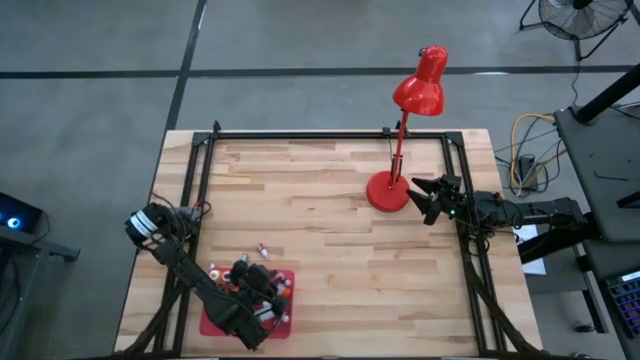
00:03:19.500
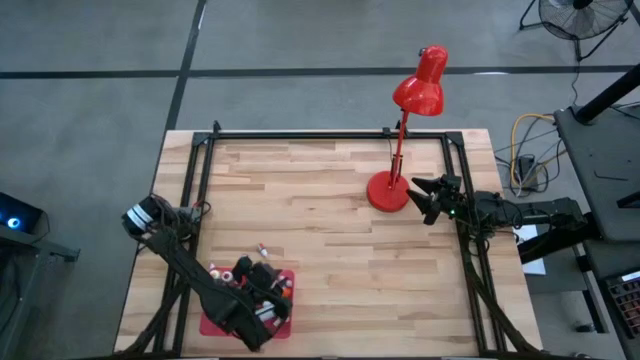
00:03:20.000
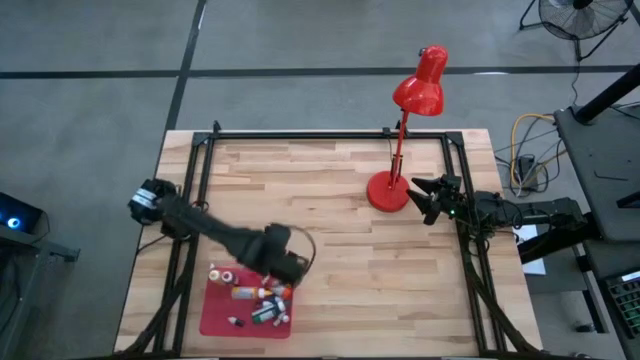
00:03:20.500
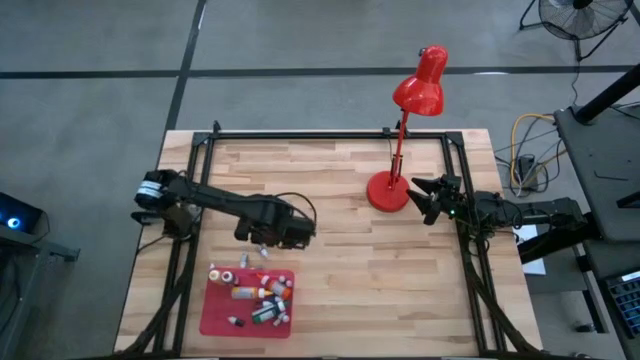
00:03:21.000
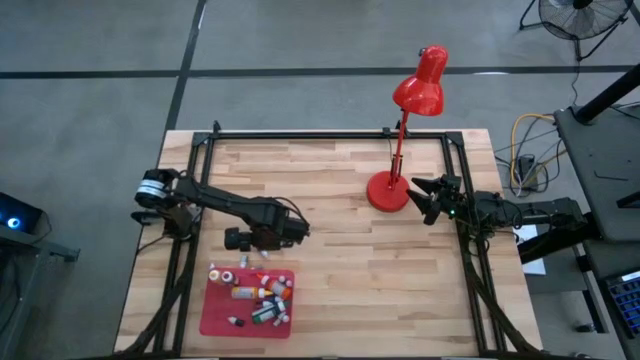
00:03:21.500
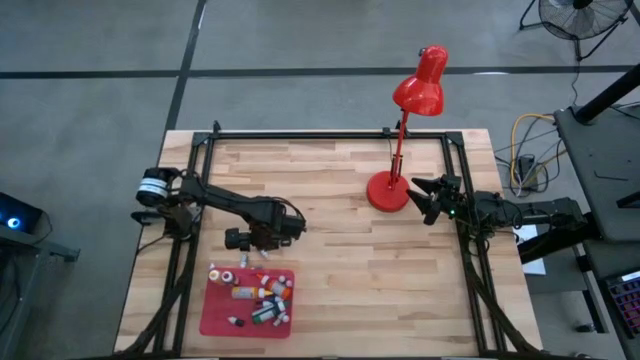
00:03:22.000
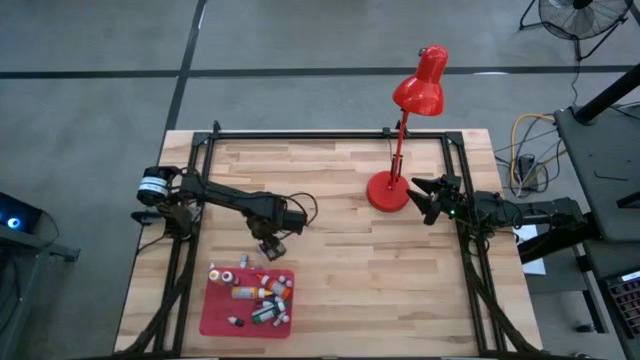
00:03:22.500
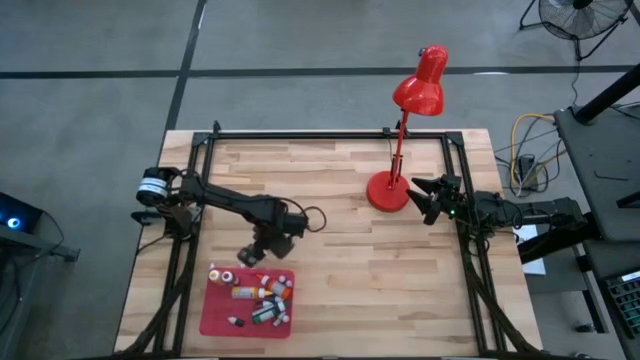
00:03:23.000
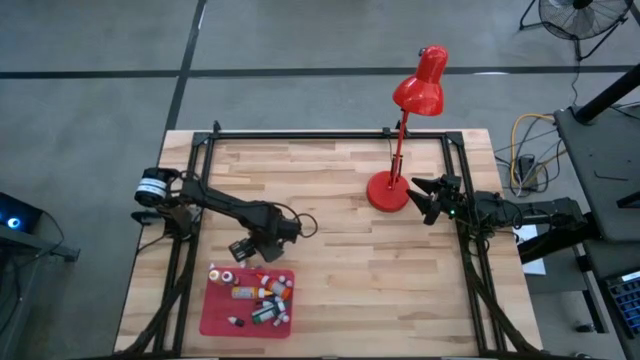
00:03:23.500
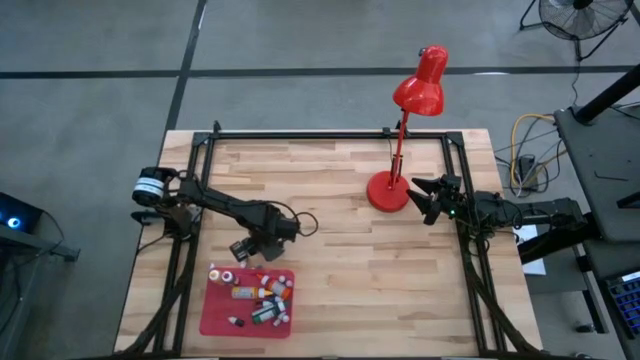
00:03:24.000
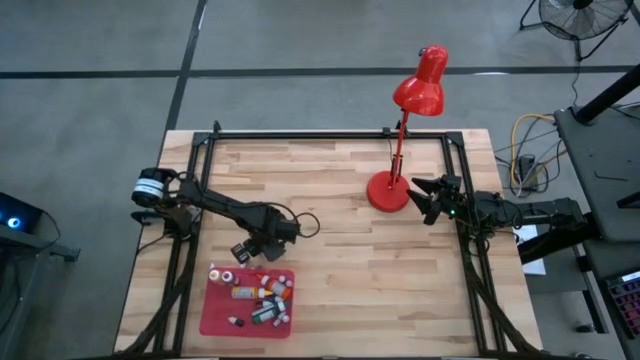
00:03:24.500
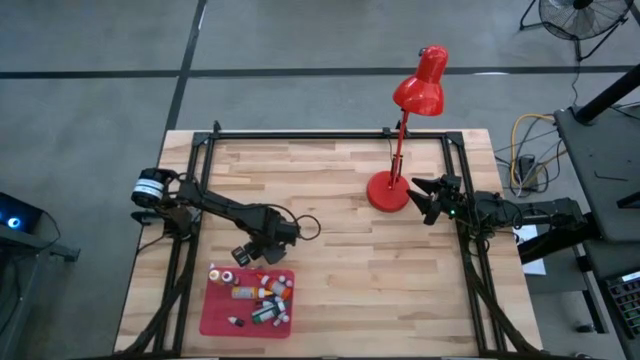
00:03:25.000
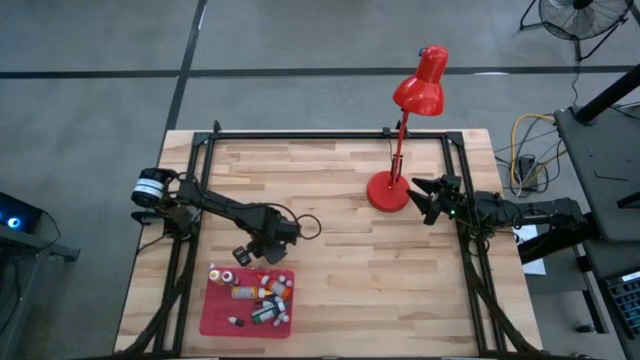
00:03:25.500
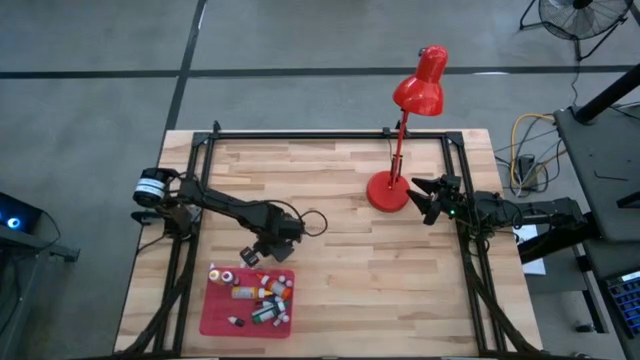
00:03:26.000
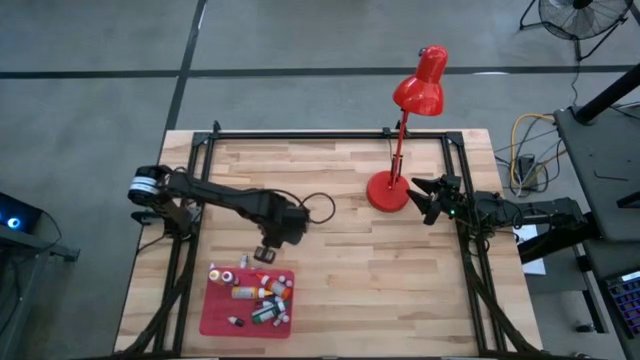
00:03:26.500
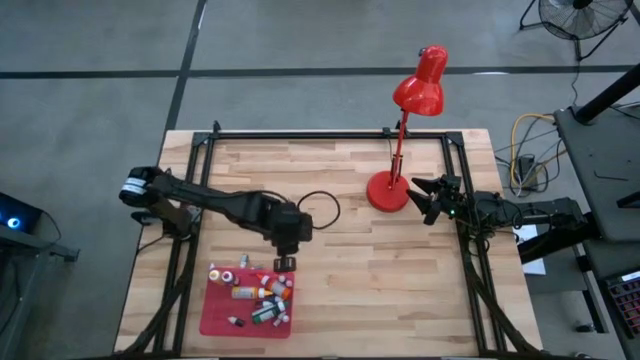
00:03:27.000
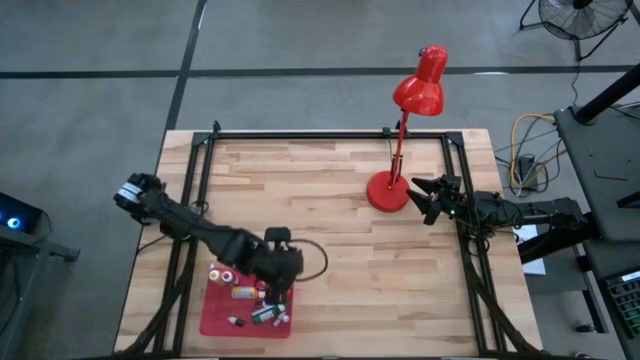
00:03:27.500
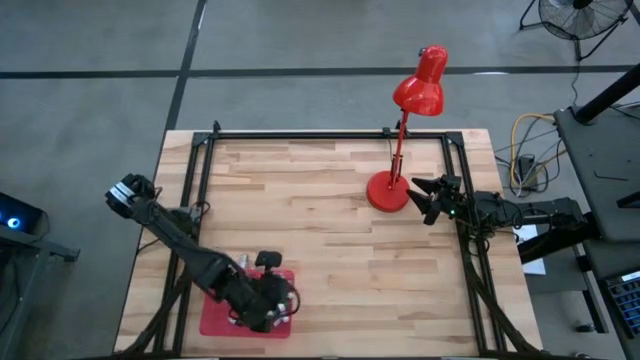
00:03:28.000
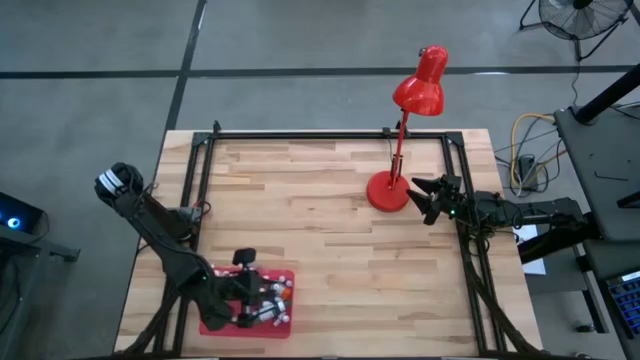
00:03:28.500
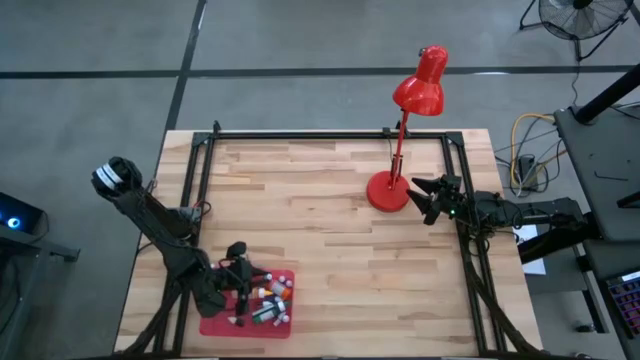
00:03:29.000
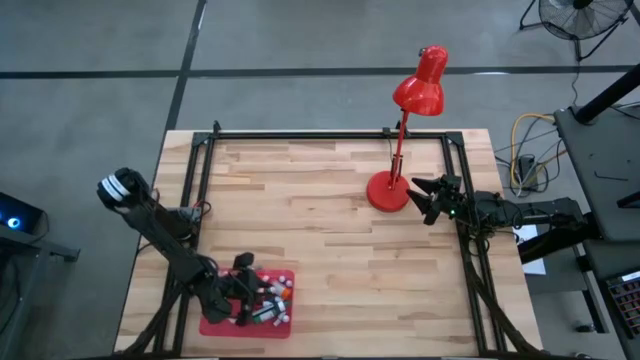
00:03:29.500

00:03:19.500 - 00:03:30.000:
Task: Pick & Place food coloring
Put the small red food coloring bottle into the red bin

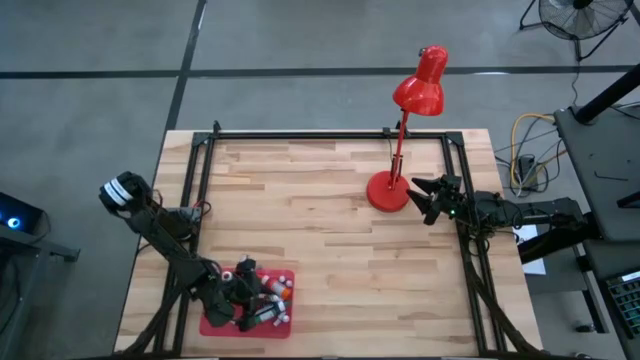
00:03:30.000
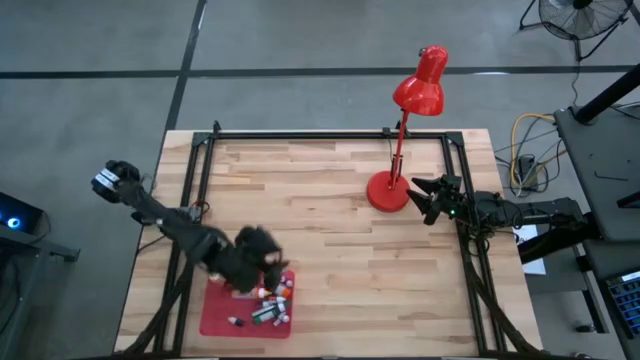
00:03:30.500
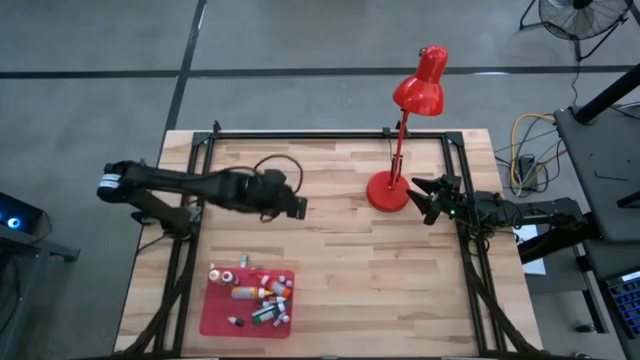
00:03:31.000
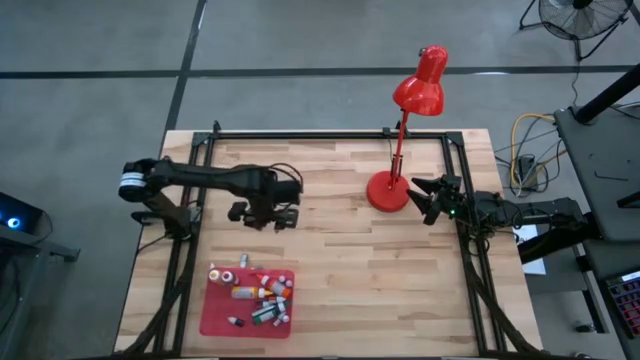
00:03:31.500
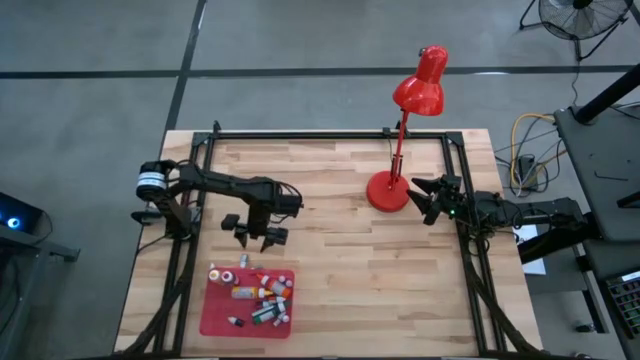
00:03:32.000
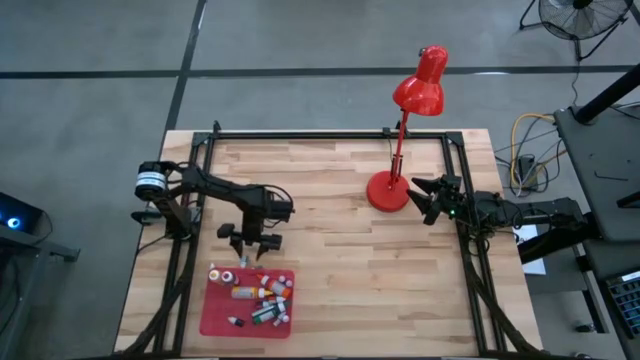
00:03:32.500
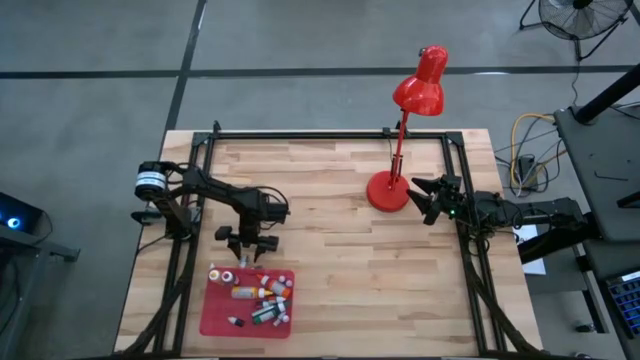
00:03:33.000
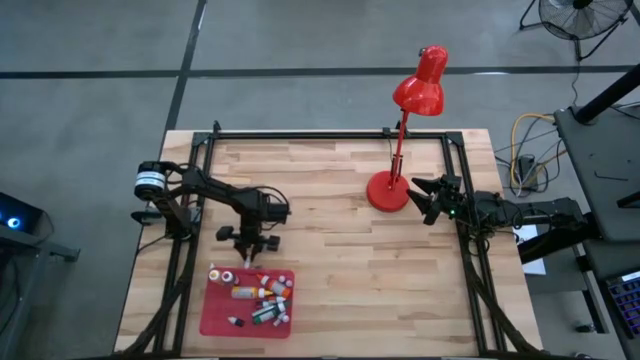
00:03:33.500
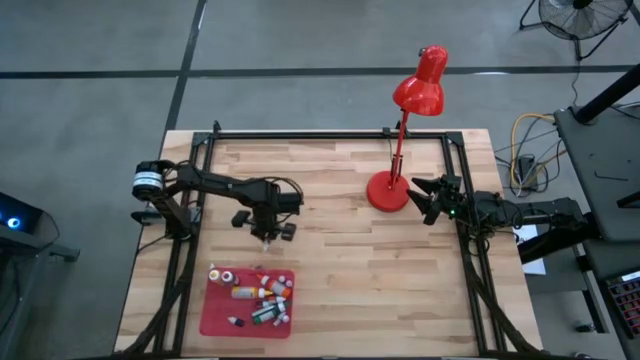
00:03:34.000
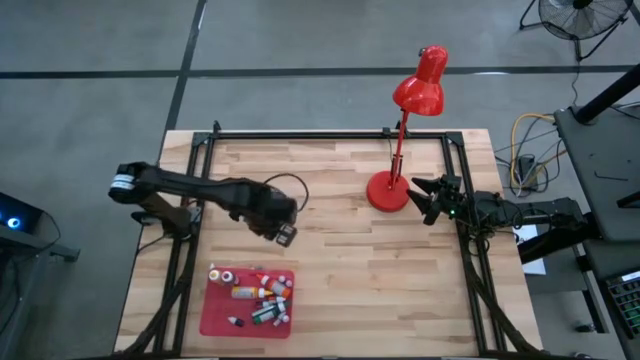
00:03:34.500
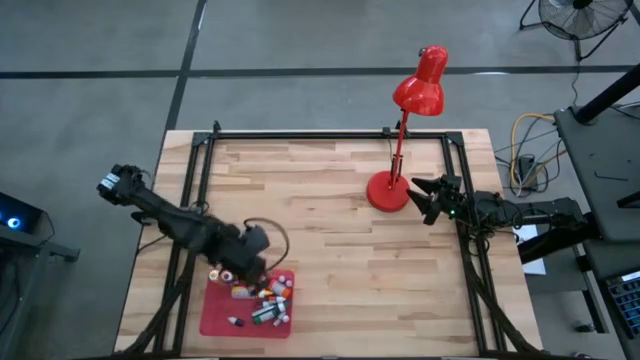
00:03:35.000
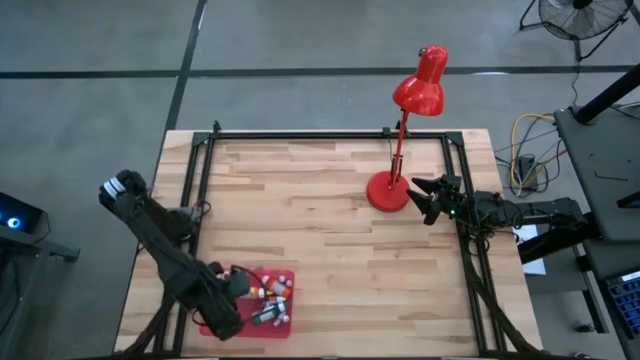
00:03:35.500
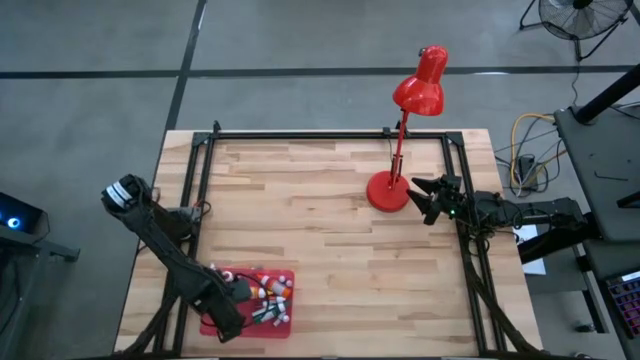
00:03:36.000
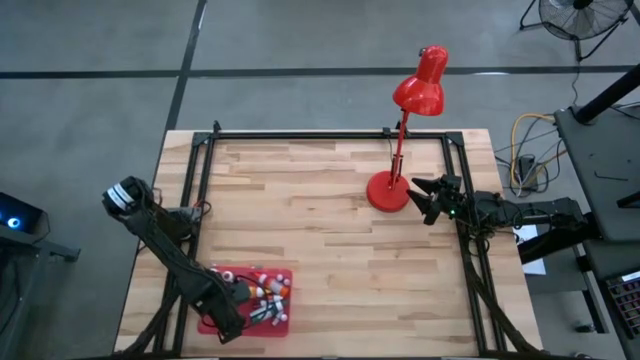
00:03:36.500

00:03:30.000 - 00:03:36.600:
Put the small green food coloring bottle into the red bin

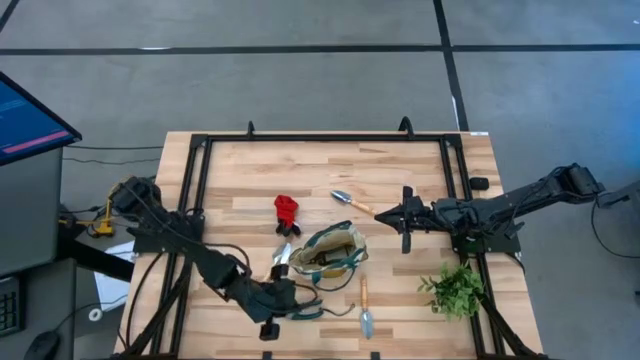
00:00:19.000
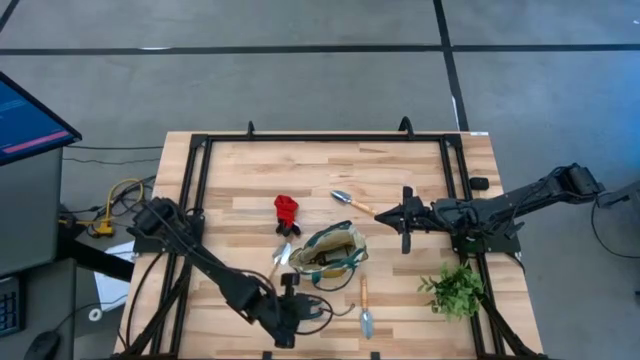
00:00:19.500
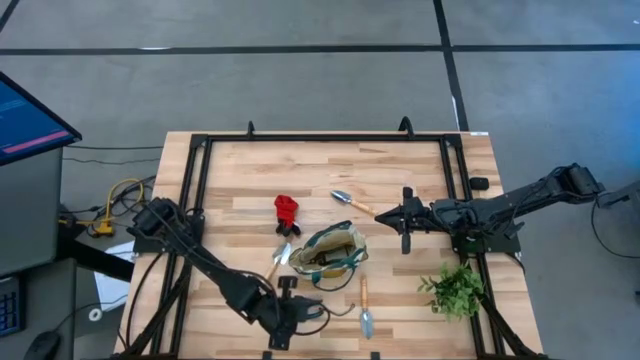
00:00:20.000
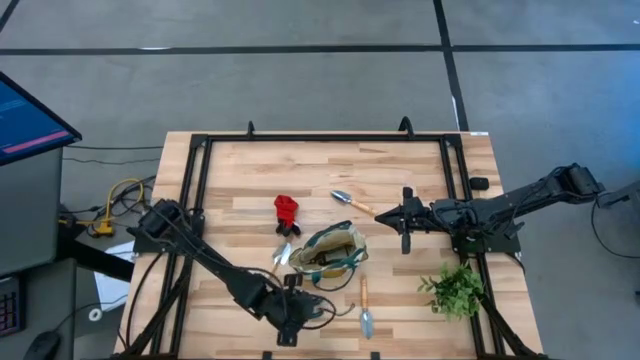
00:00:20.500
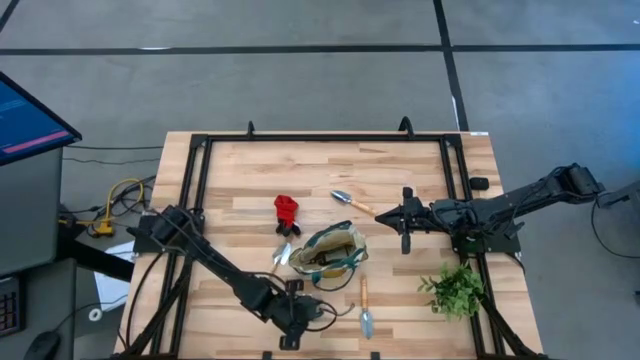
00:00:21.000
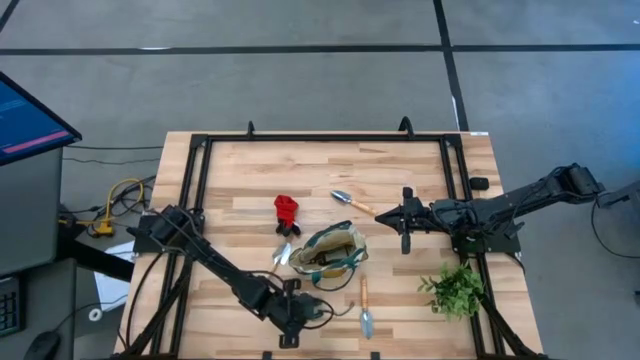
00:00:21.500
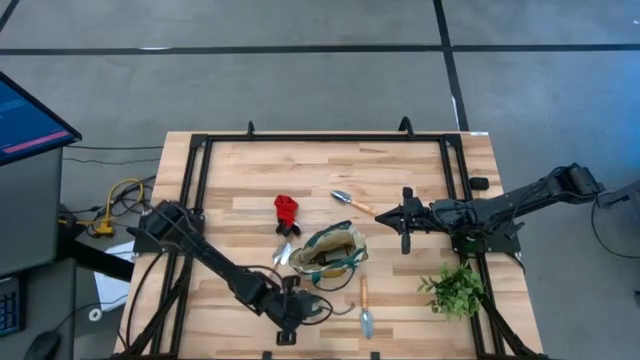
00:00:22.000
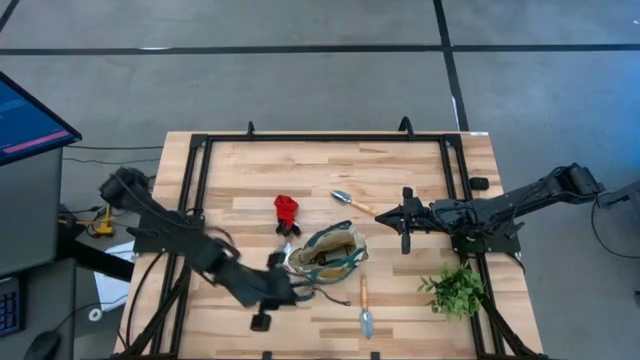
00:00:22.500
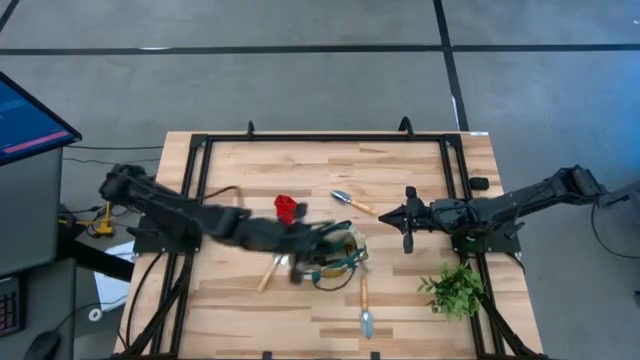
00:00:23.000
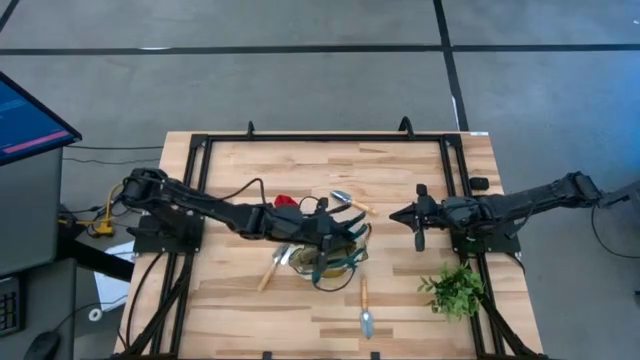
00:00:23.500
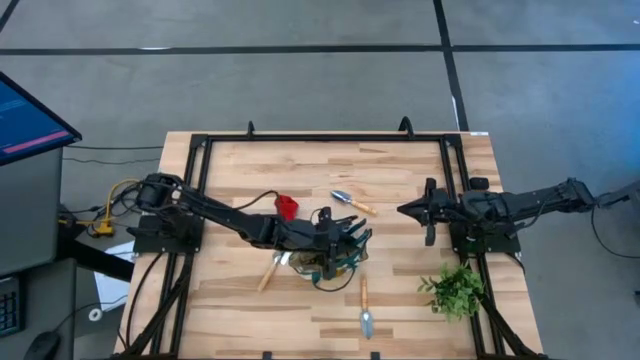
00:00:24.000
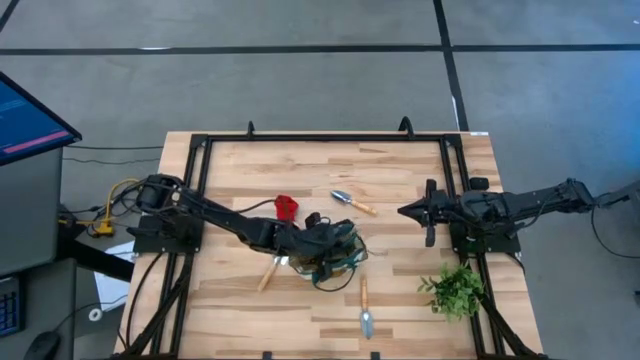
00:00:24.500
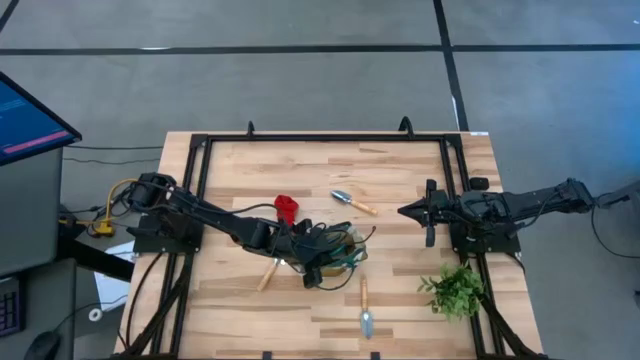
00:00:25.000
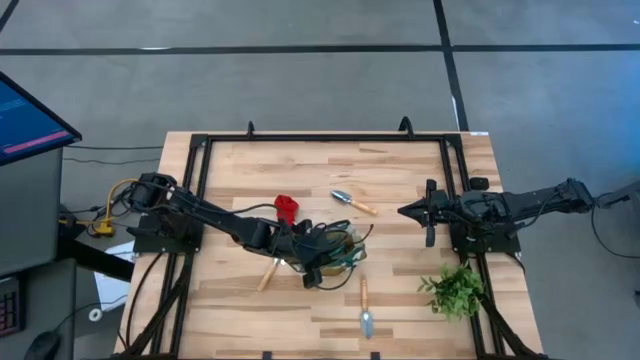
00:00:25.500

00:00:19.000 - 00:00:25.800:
Task: Pick & Place Garden tools in Gardening bag
Put the shear scissors into the gardening bag
